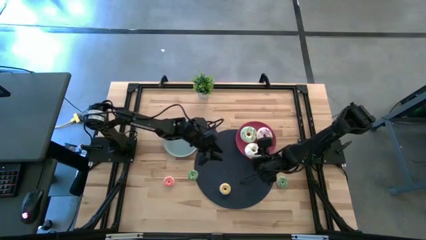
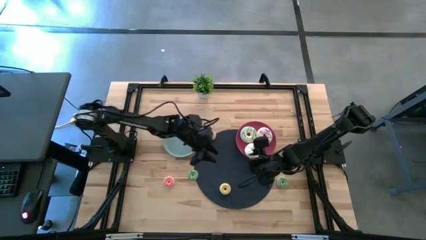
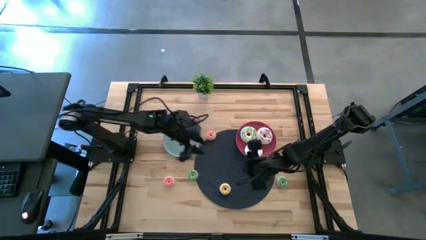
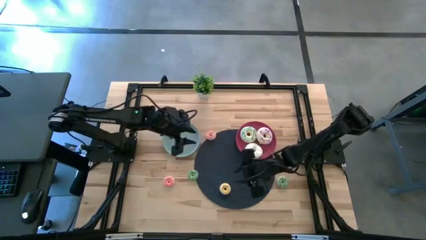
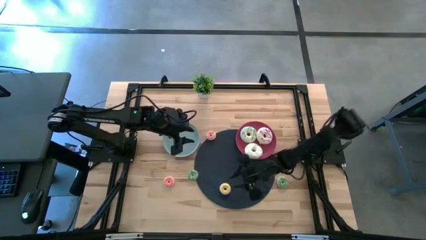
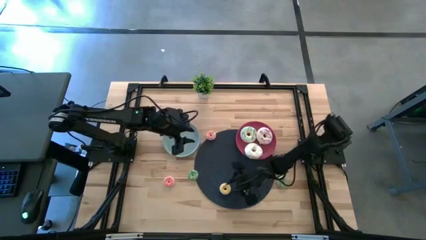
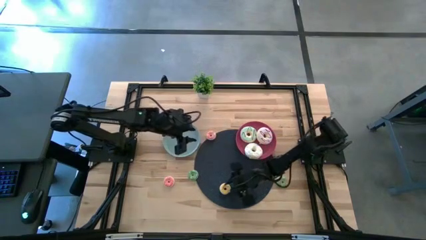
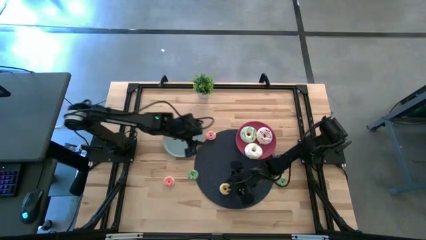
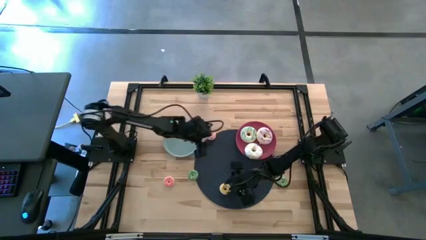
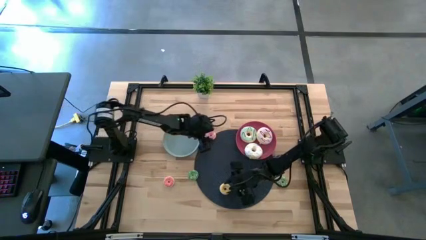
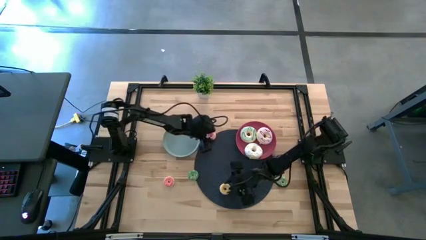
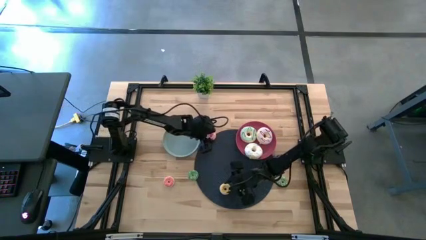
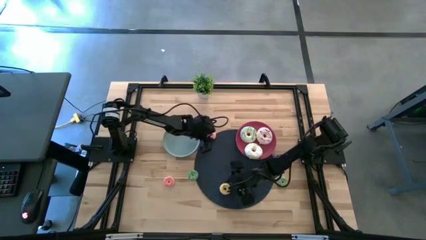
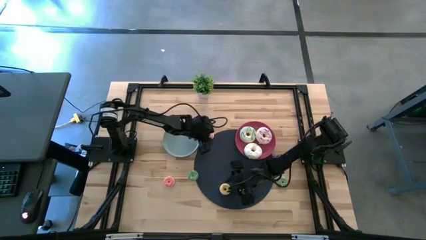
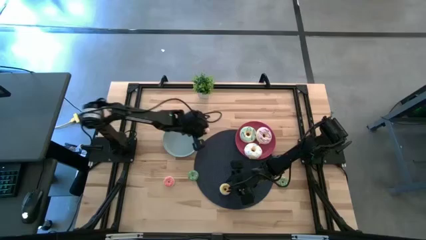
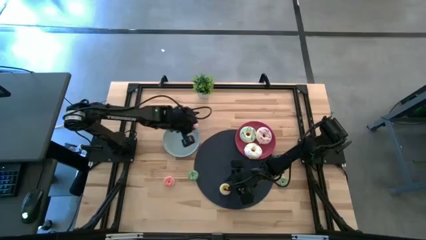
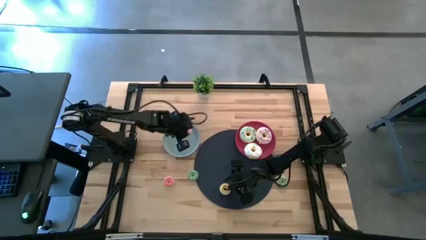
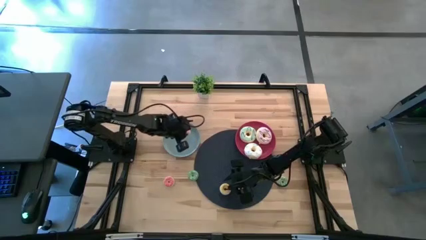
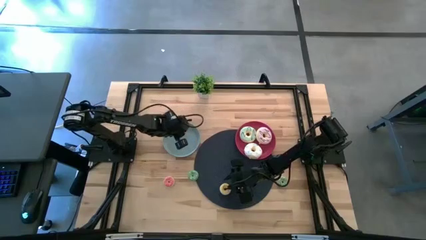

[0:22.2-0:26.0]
Task: Pick & Place donuts
Put the top small red donut on the blue plate

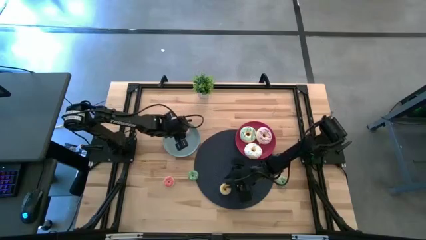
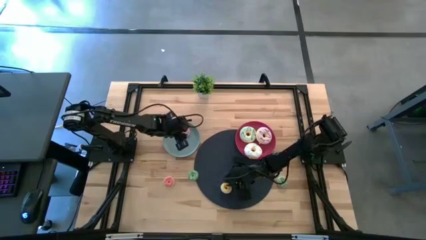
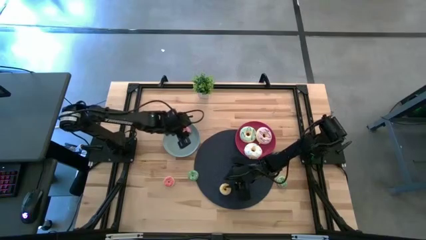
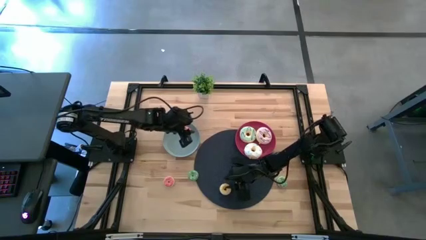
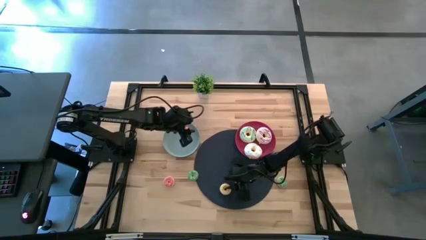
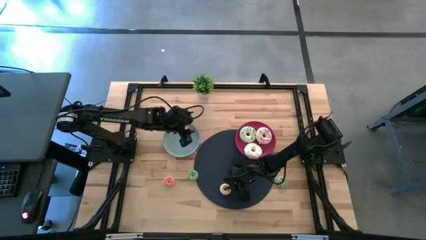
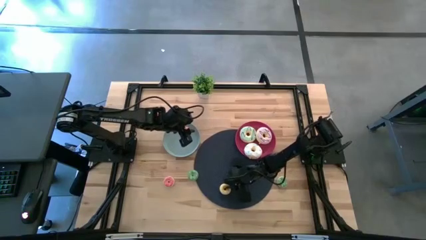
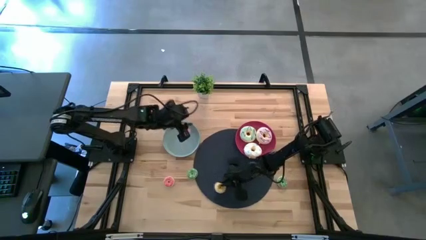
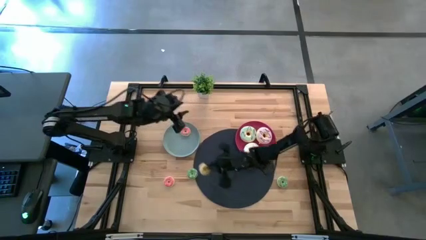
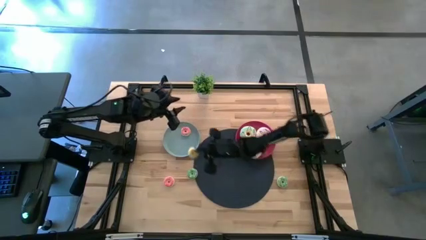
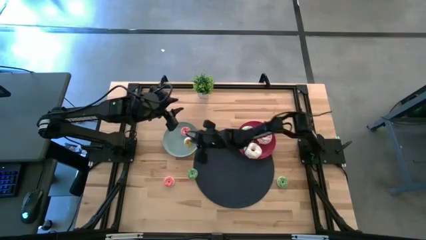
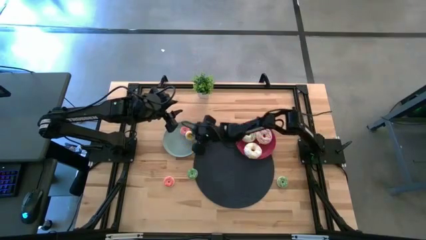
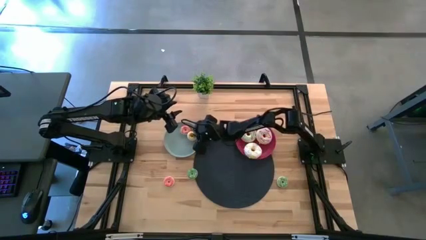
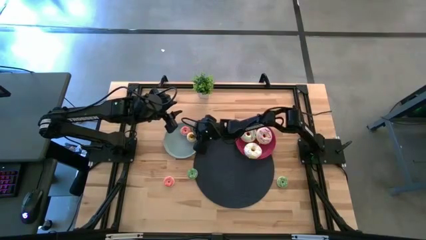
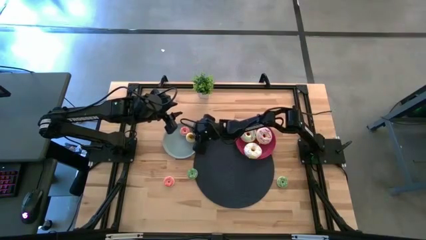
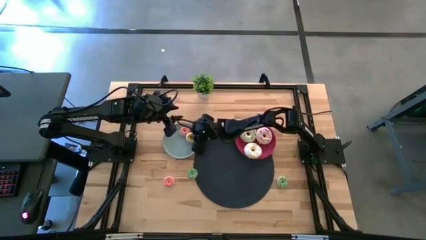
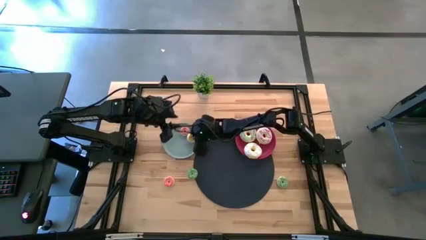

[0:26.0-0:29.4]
Put the small yellow donut on the blue plate

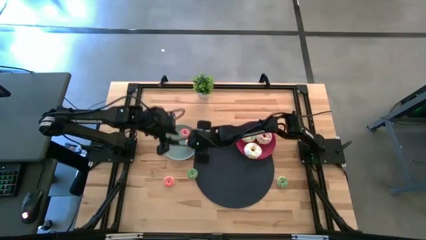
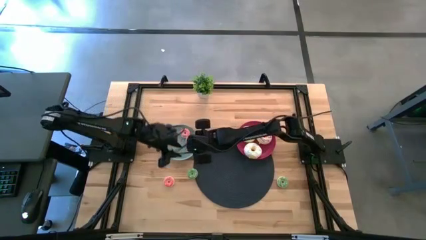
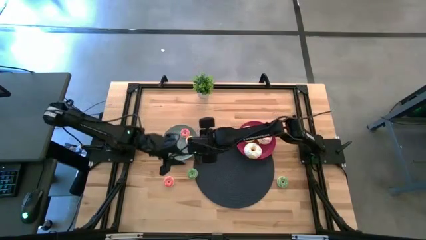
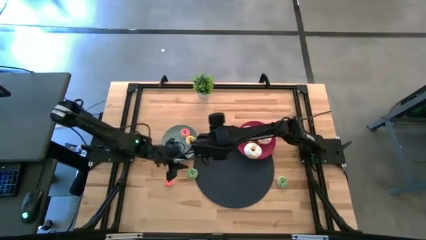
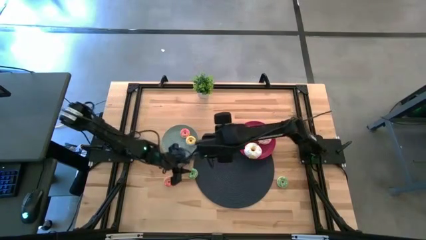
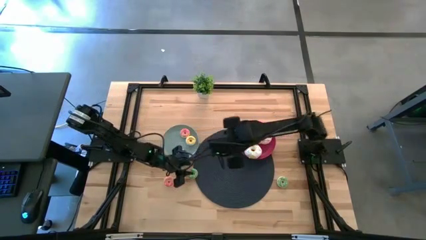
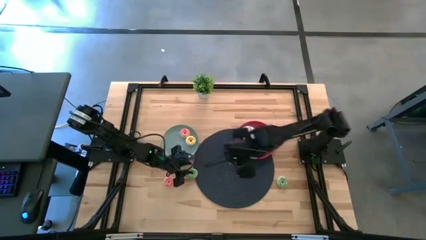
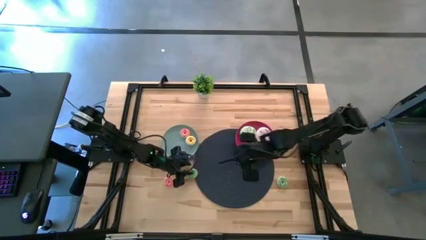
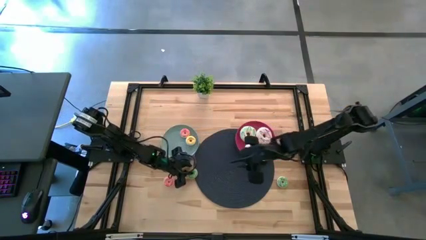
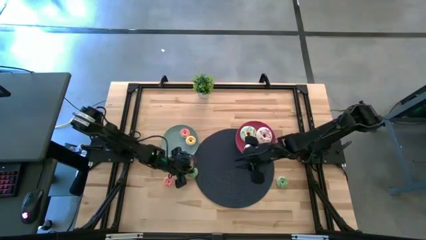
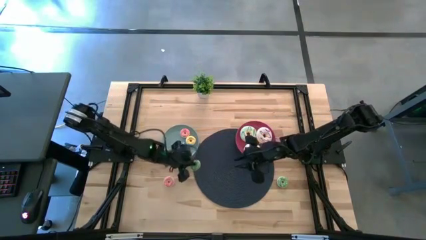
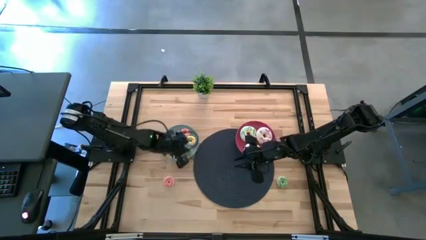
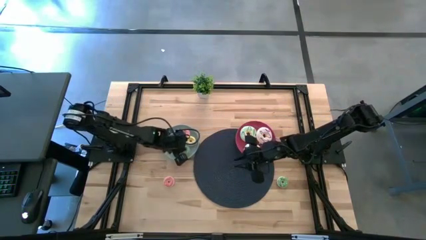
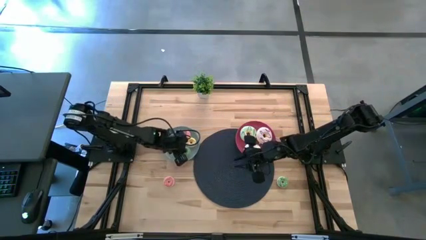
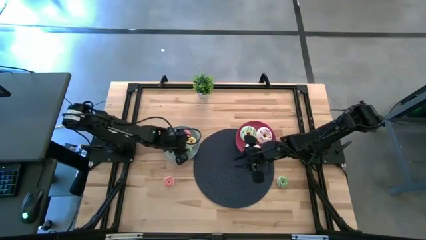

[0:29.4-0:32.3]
Put the left small green donut on the blue plate

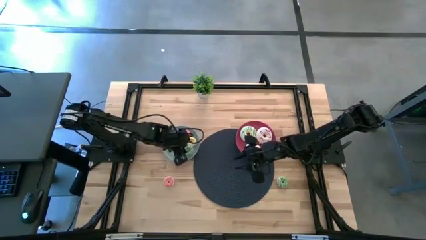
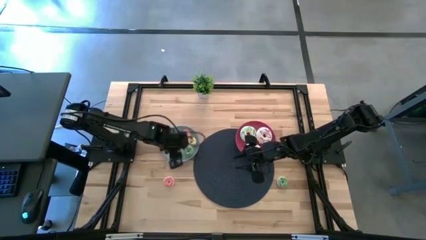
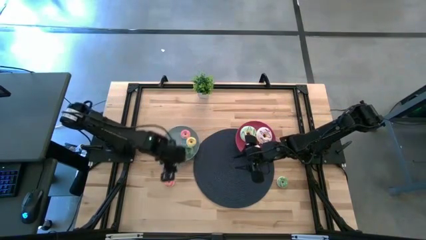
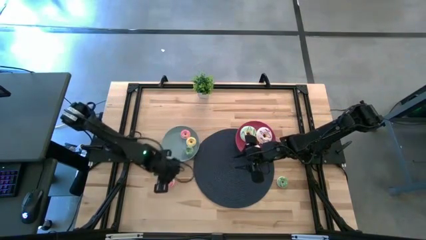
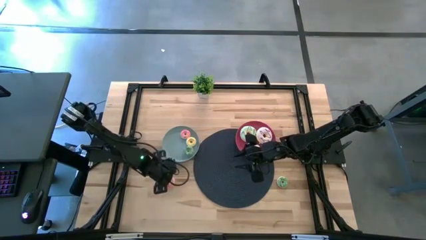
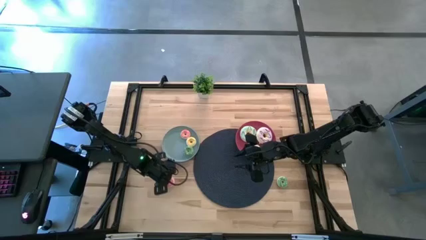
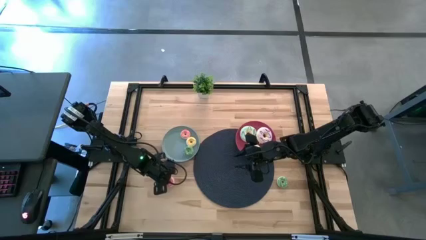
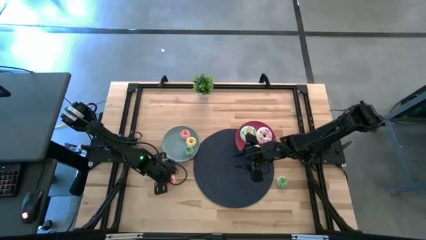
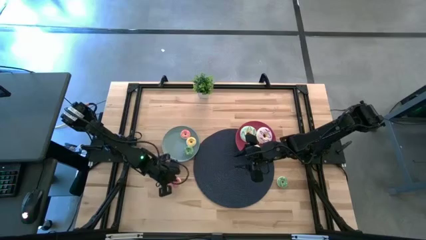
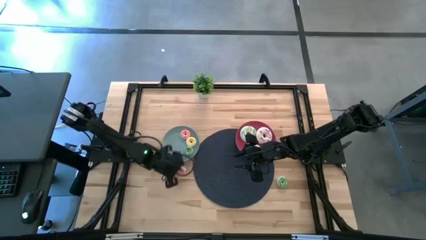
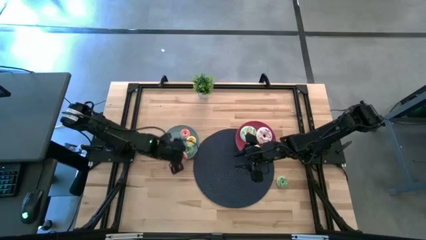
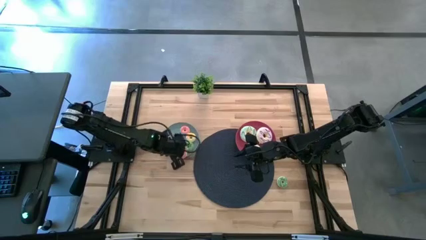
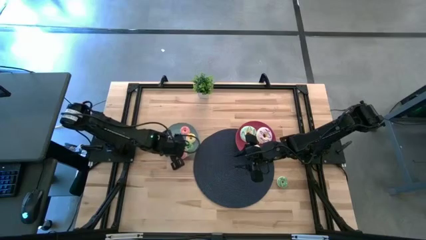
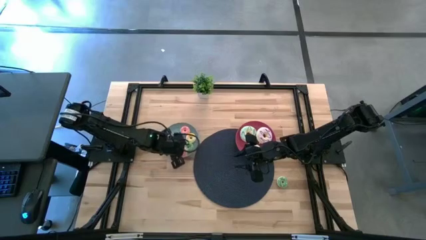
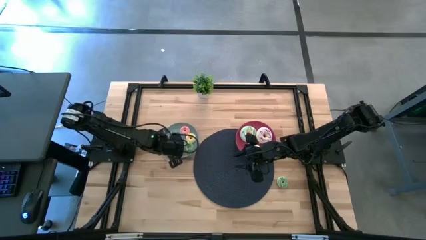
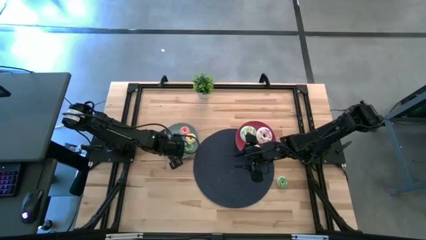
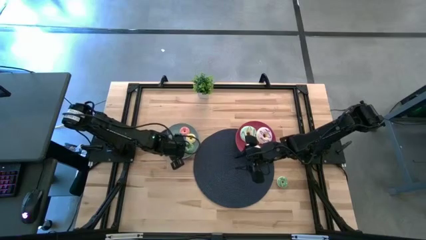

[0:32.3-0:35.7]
Put the small red donut on the blue plate

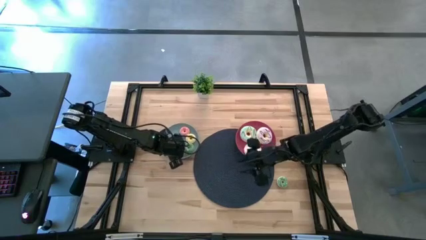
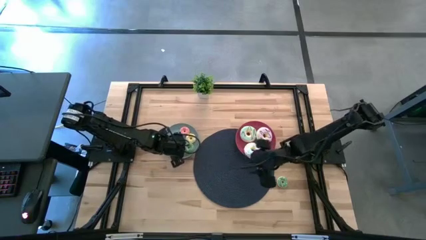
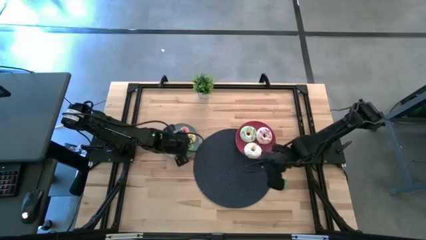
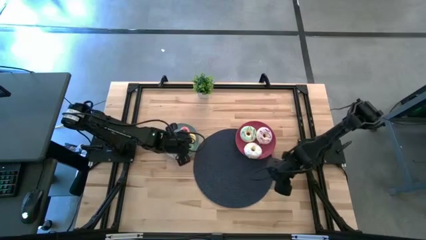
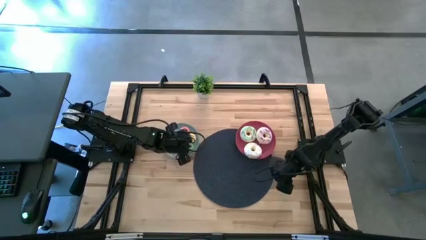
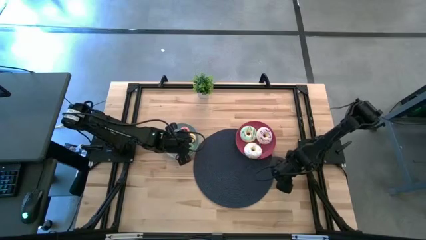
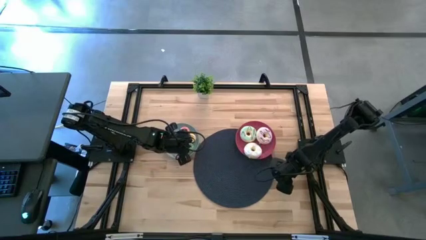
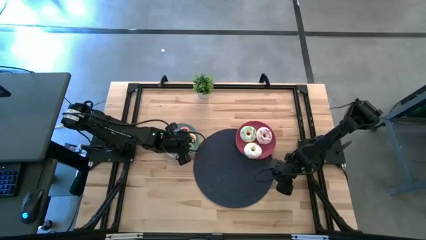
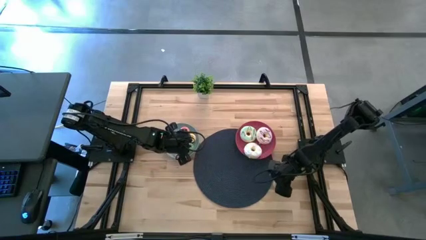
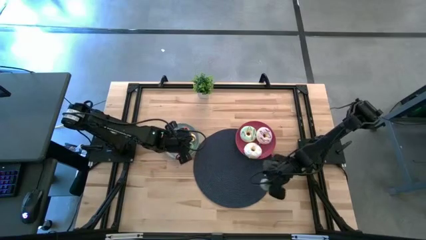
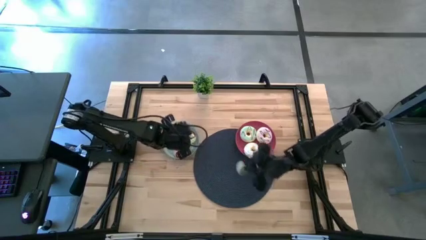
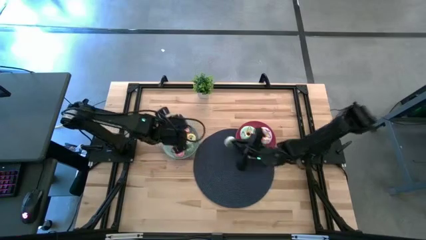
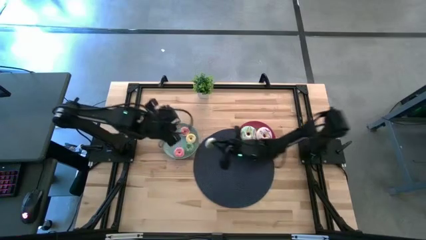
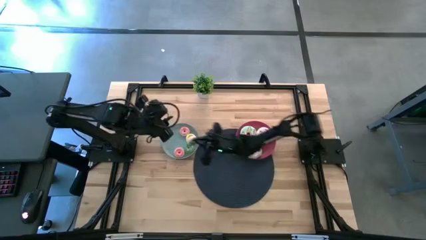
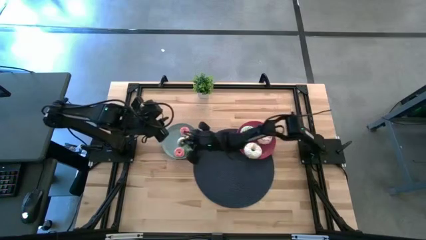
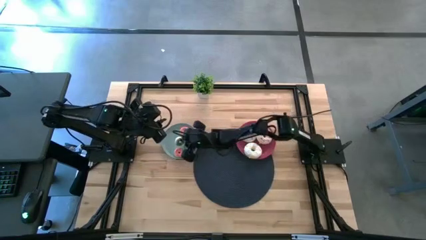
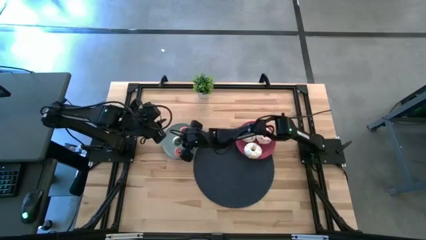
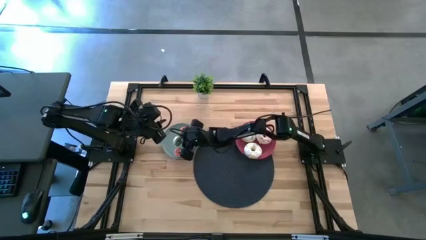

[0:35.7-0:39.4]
Put the small green donut on the blue plate
